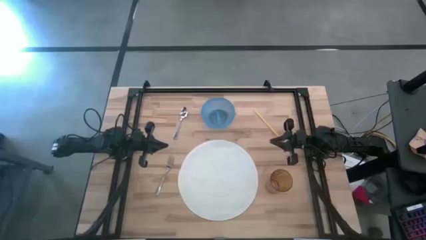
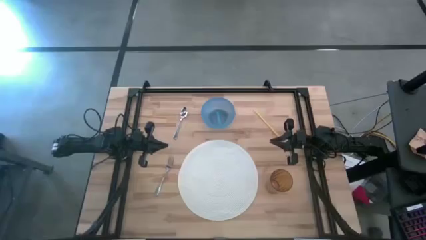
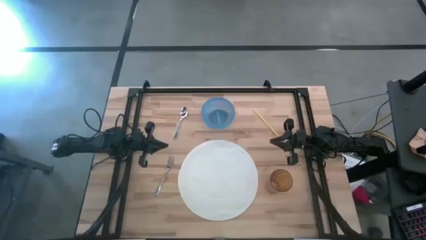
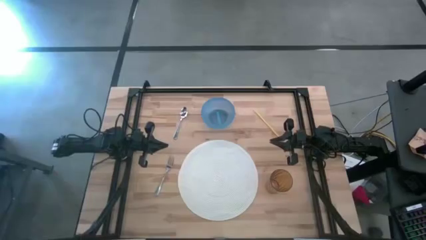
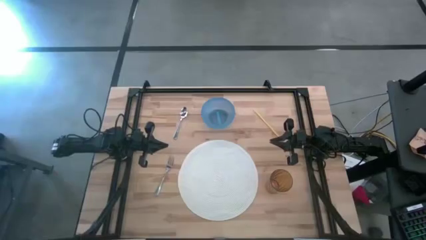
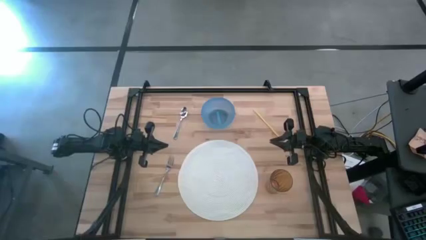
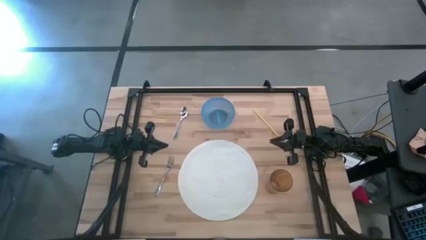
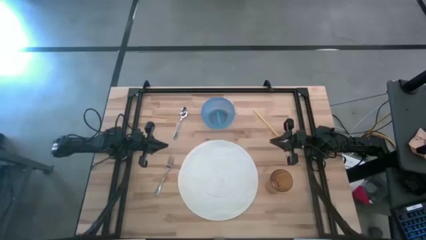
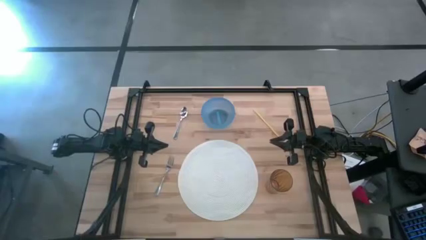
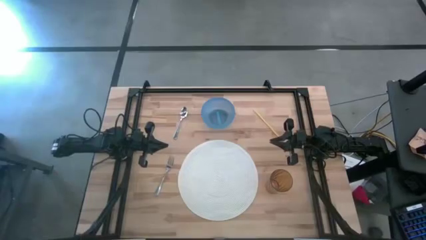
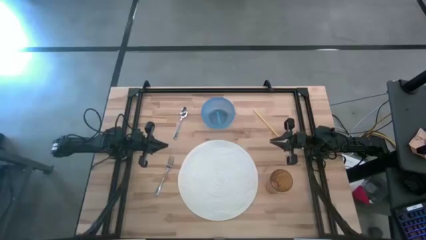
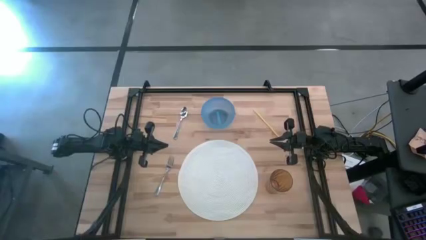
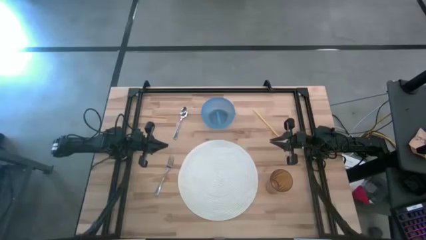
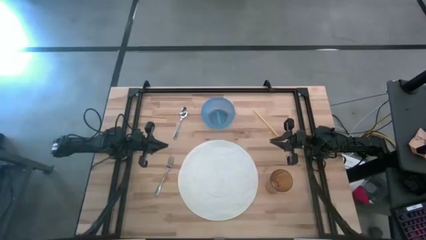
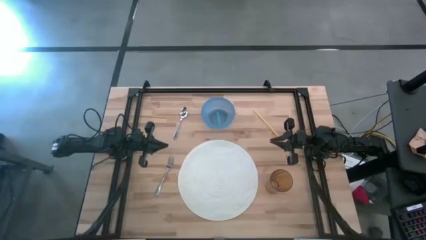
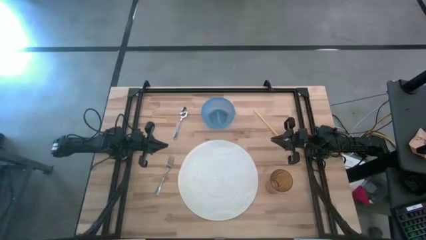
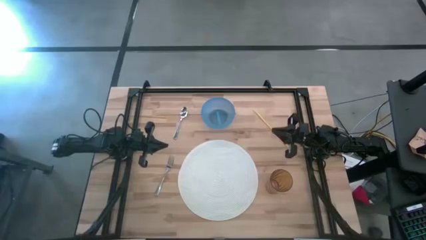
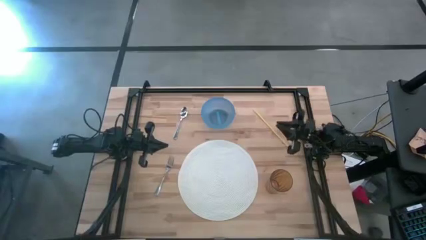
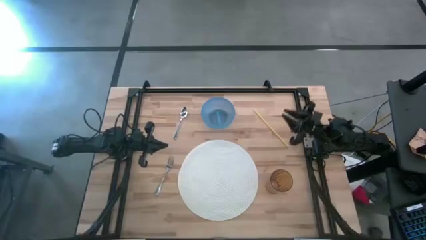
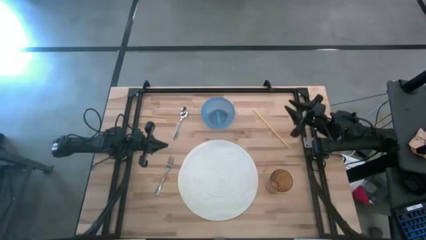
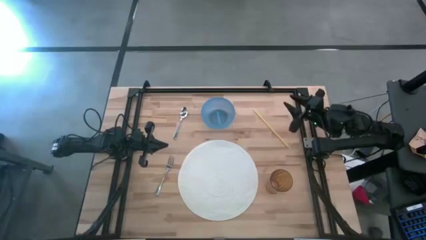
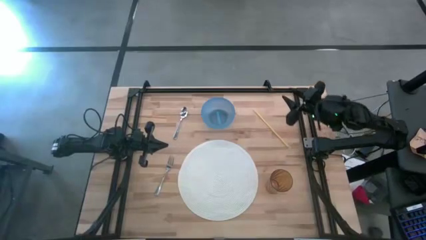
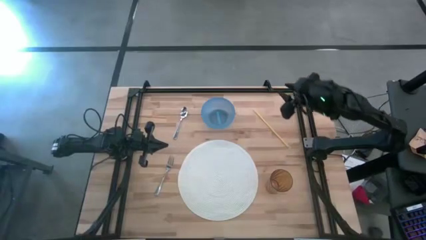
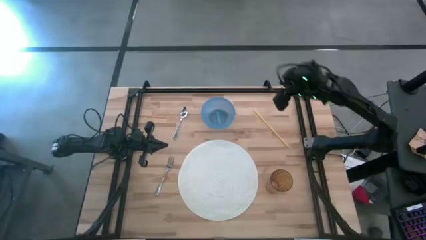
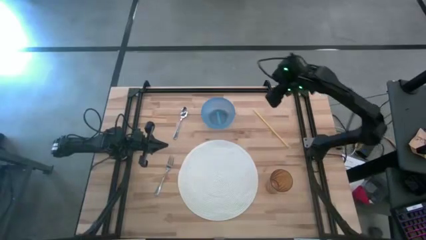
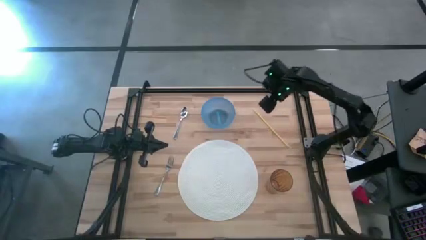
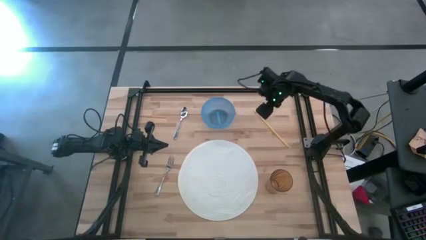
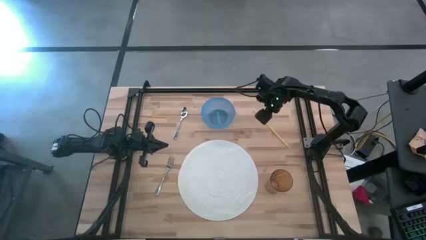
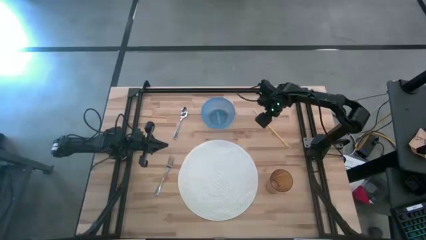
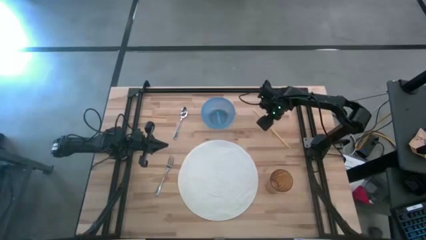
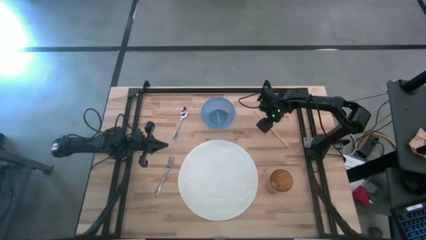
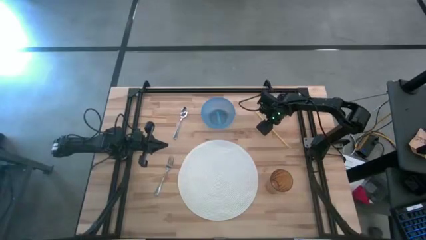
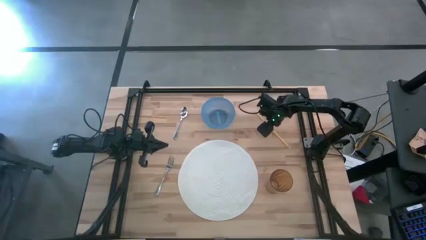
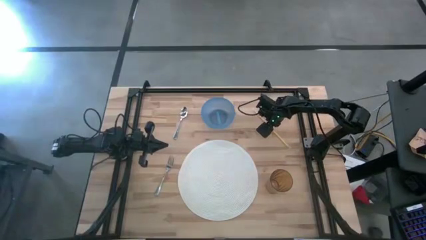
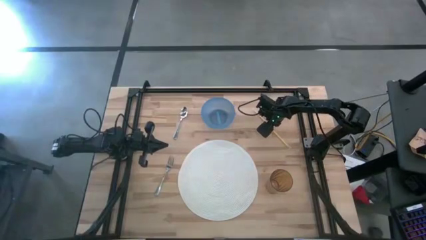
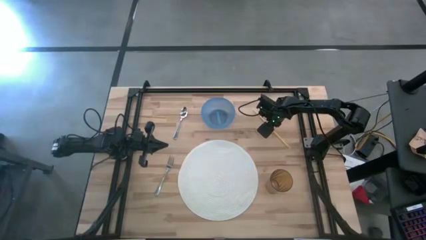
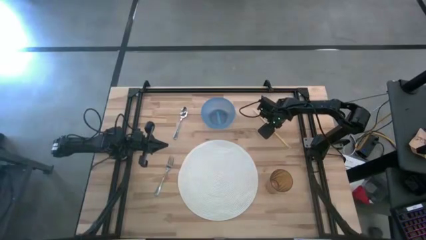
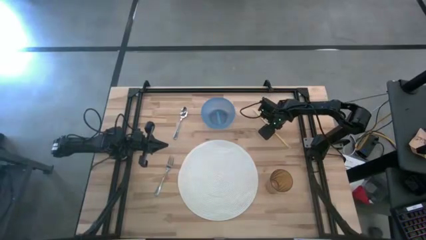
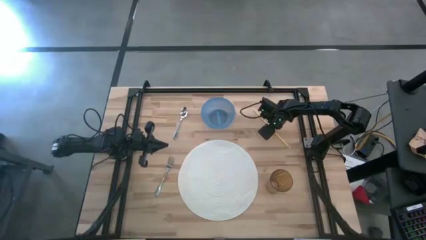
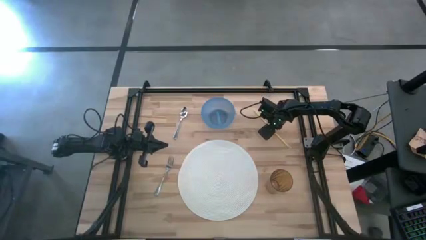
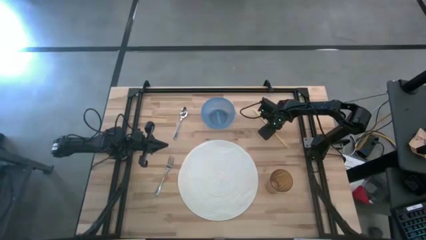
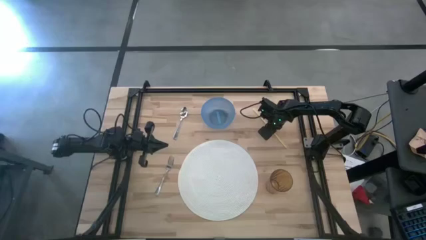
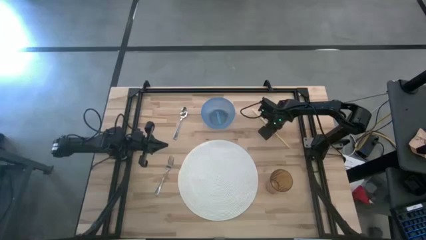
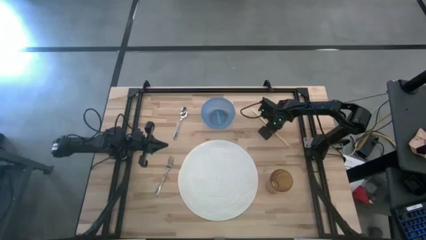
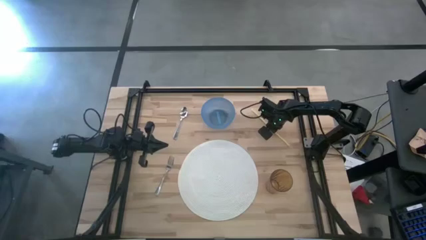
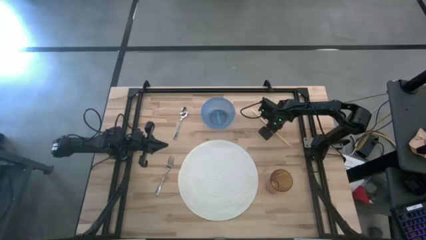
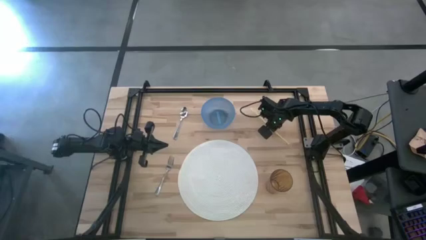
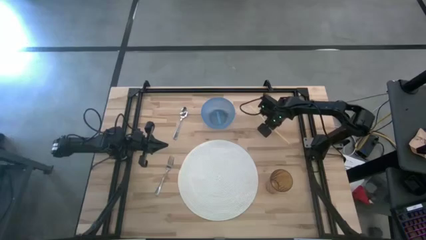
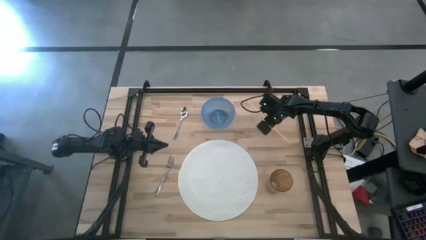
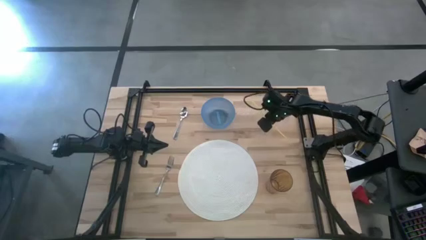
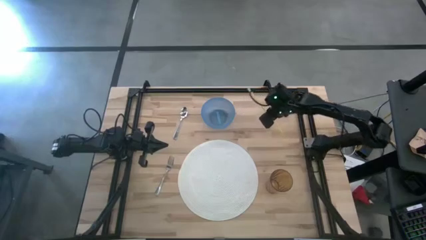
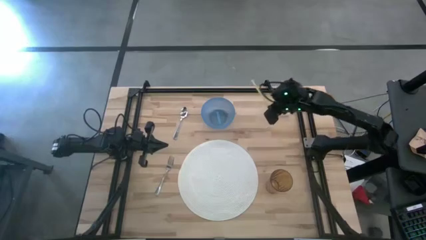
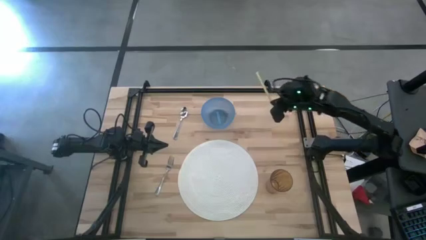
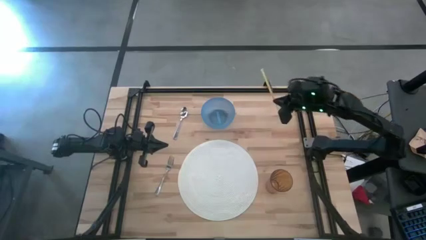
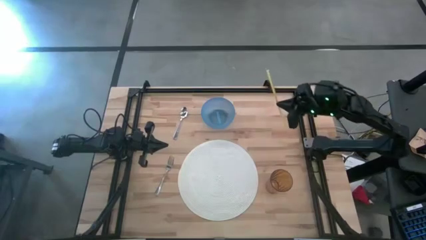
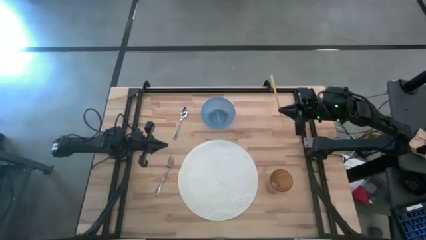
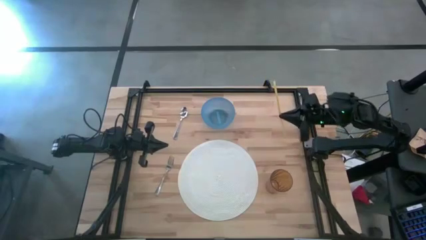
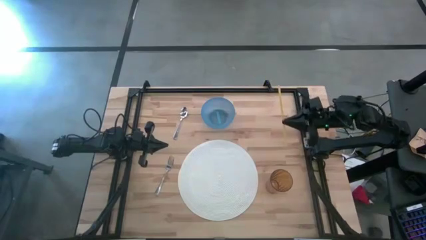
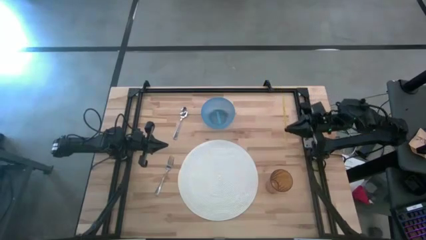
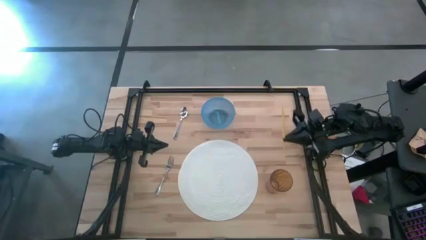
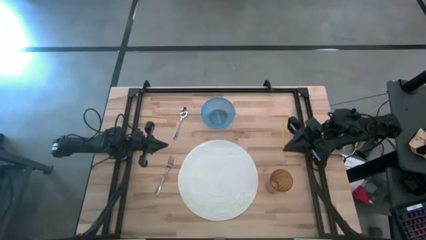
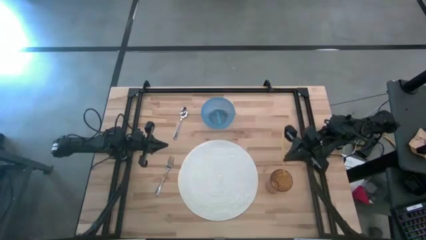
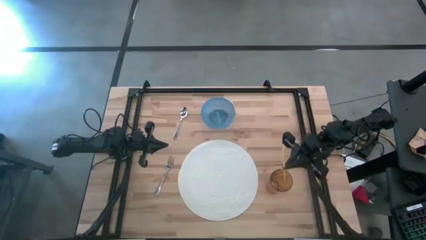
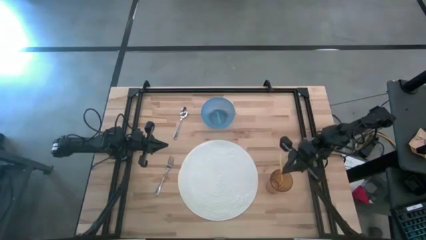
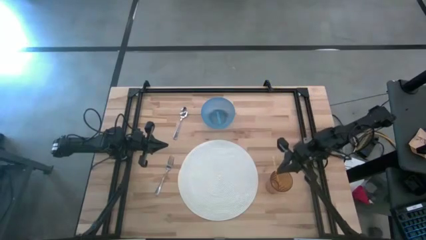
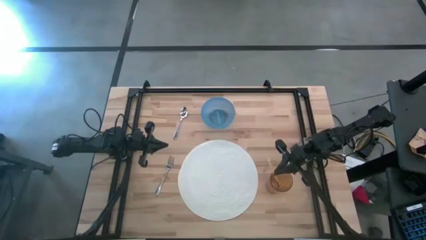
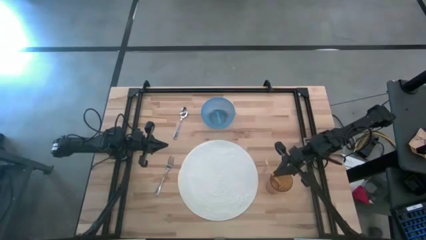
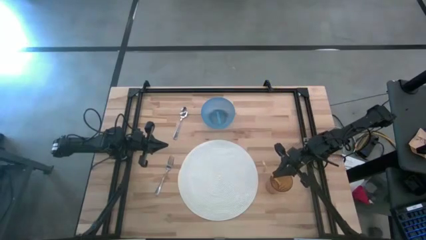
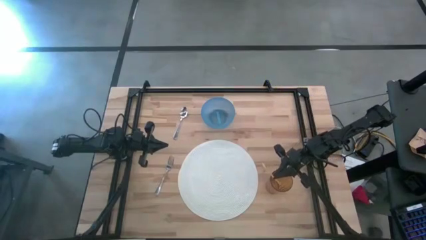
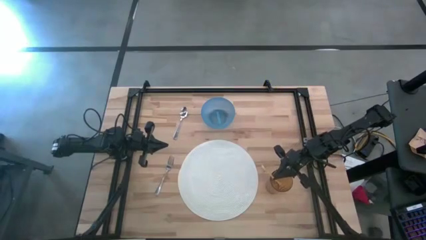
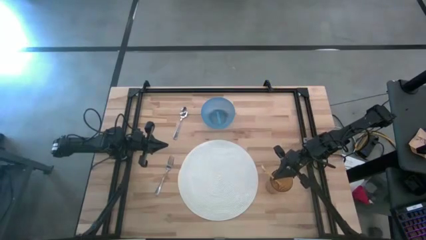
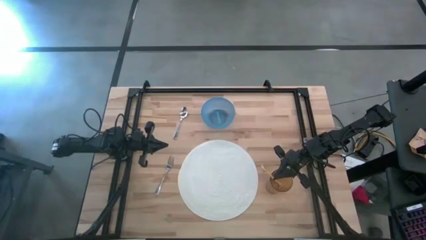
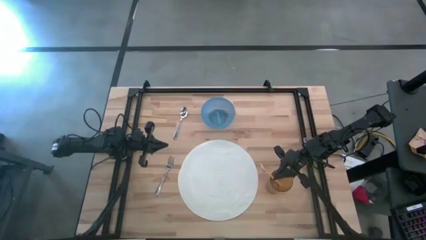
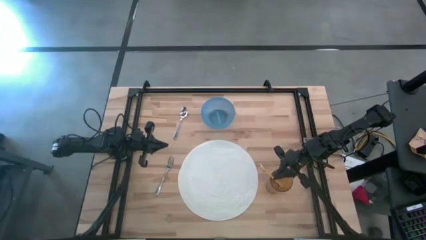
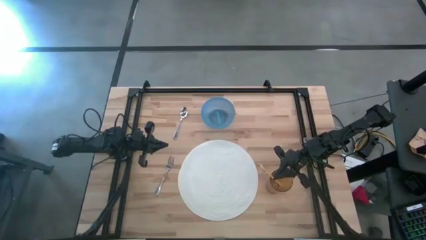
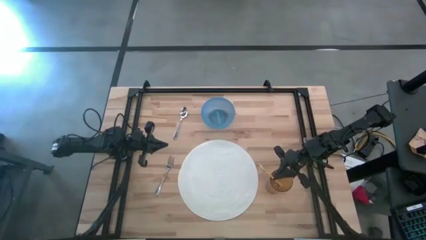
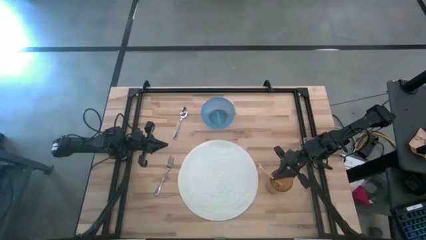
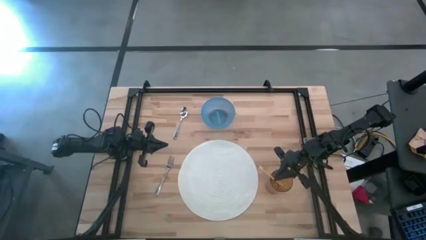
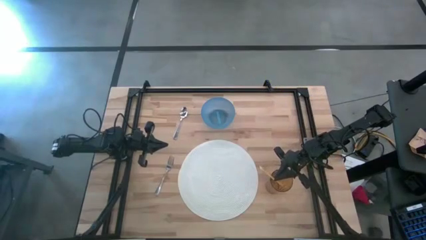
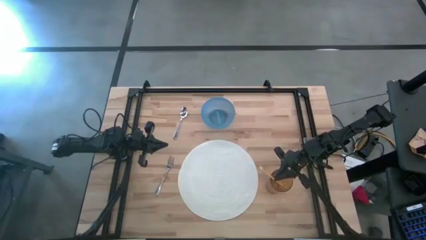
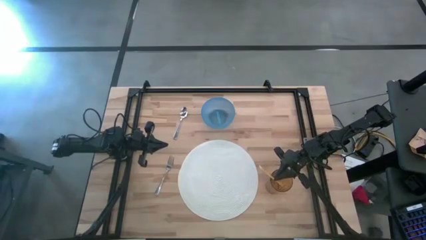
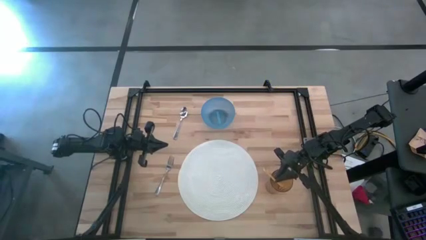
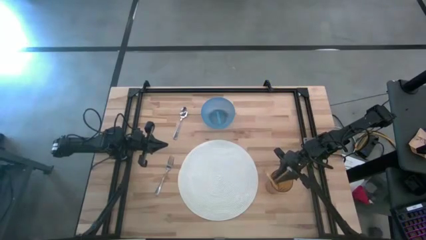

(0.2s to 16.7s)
Task: Pick & Place Utensil
Put the yellow straw into the brown cup
